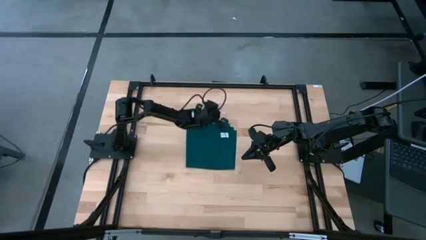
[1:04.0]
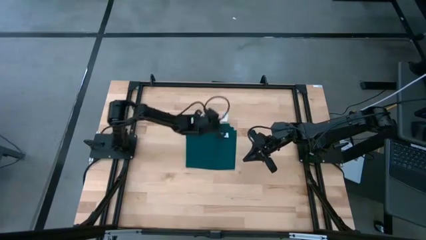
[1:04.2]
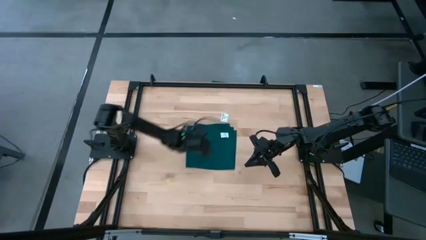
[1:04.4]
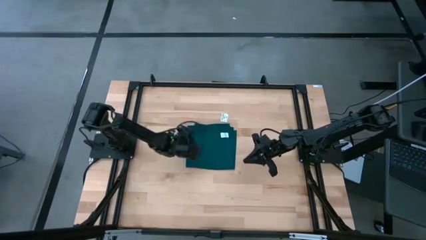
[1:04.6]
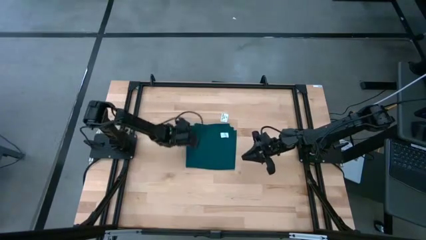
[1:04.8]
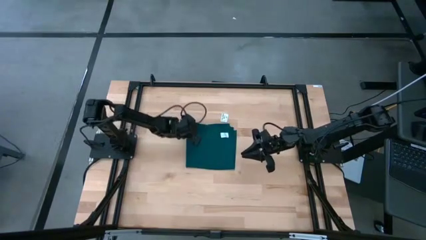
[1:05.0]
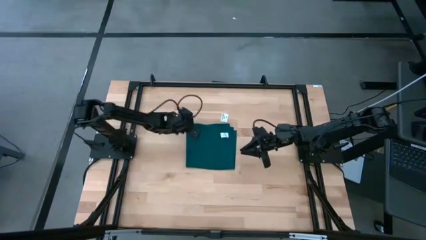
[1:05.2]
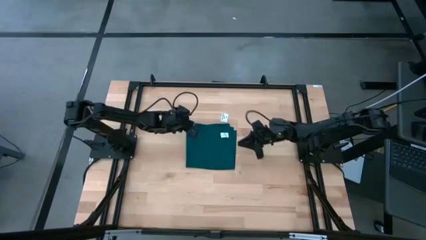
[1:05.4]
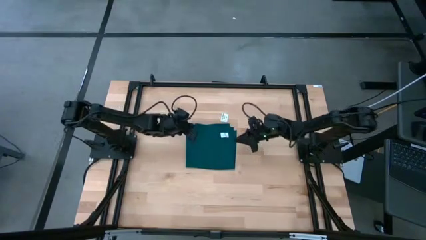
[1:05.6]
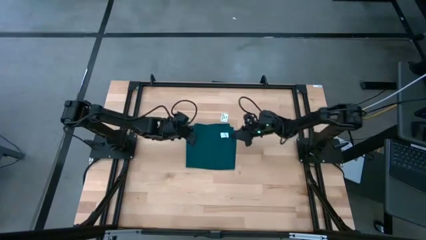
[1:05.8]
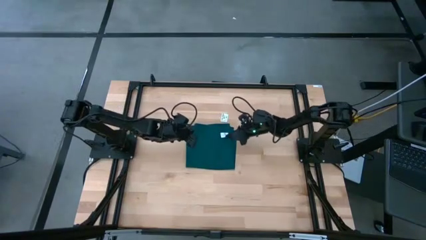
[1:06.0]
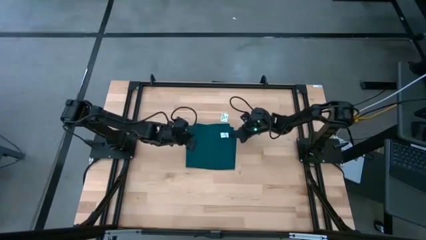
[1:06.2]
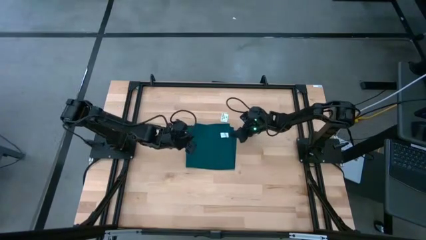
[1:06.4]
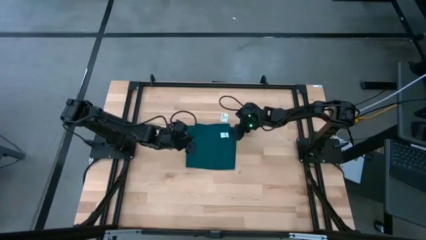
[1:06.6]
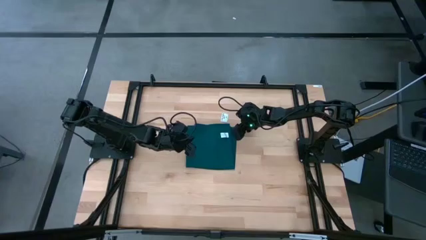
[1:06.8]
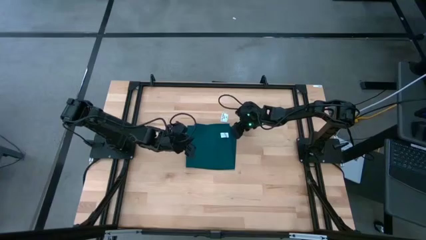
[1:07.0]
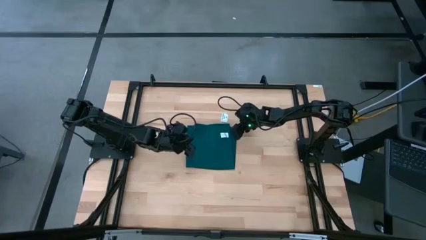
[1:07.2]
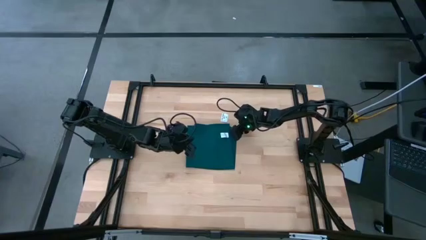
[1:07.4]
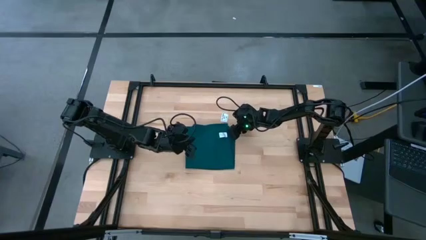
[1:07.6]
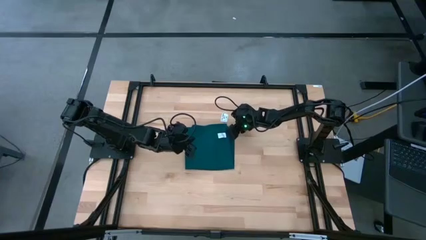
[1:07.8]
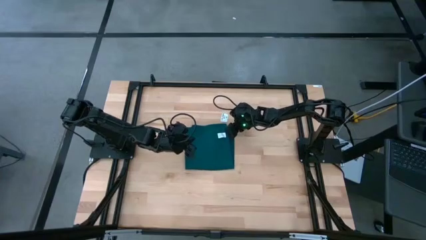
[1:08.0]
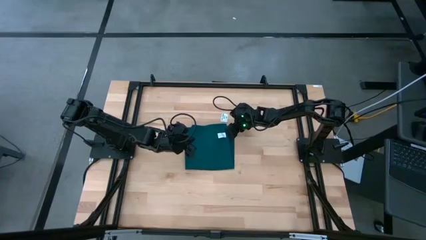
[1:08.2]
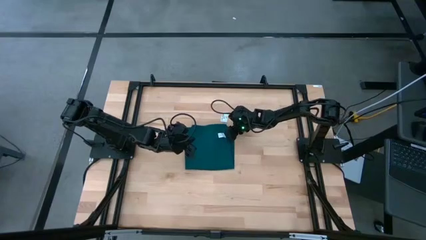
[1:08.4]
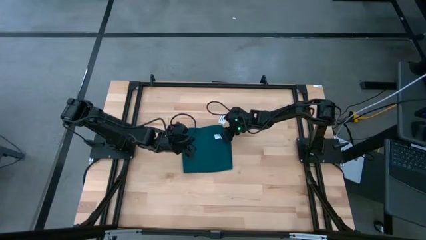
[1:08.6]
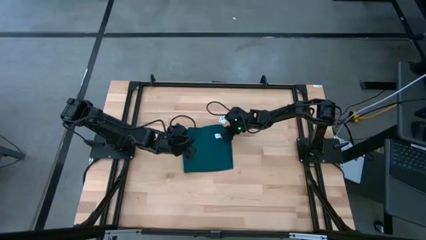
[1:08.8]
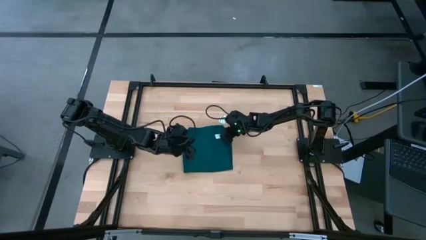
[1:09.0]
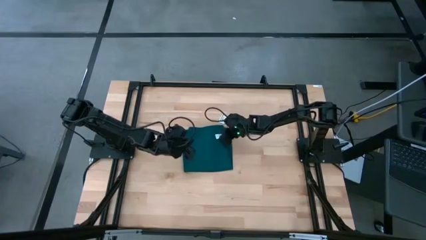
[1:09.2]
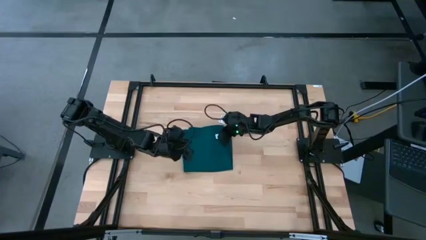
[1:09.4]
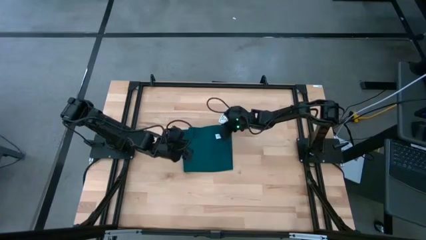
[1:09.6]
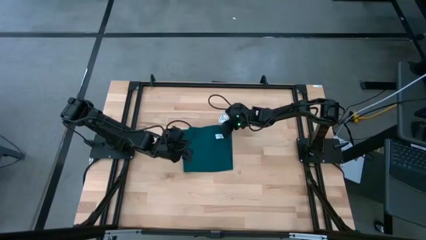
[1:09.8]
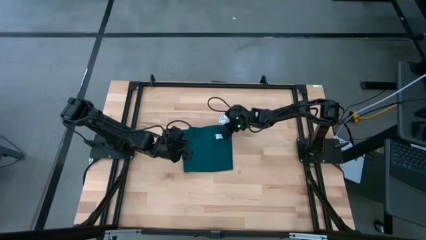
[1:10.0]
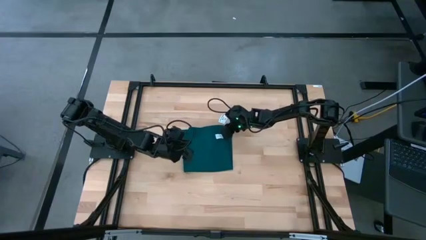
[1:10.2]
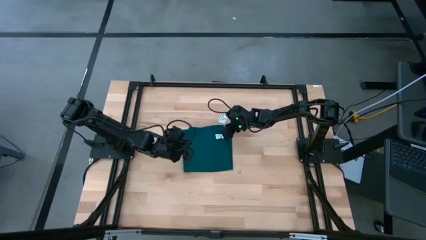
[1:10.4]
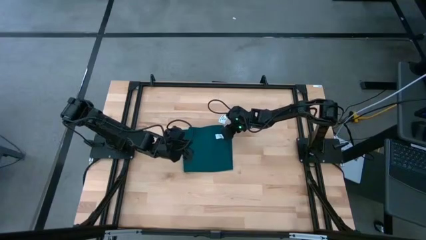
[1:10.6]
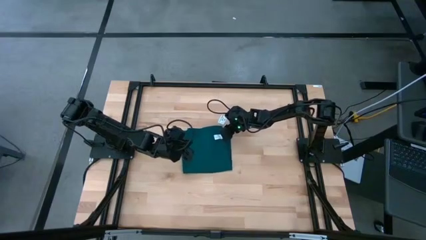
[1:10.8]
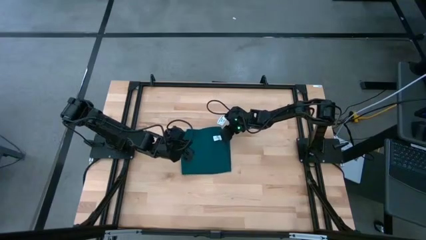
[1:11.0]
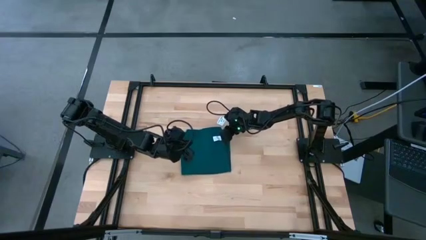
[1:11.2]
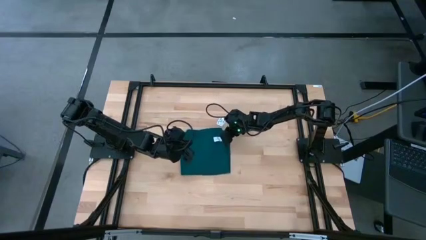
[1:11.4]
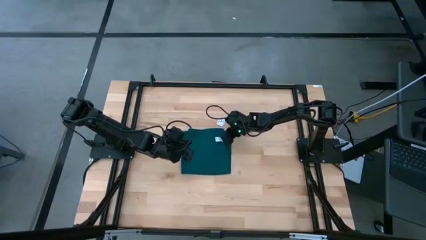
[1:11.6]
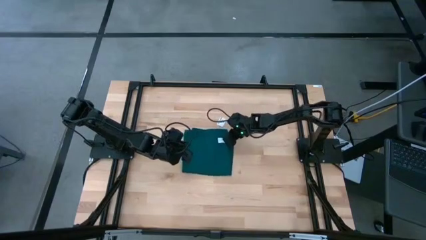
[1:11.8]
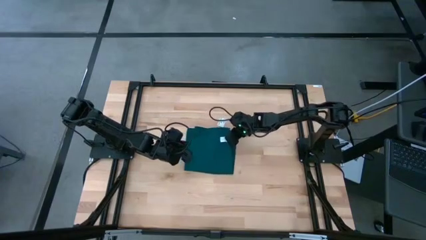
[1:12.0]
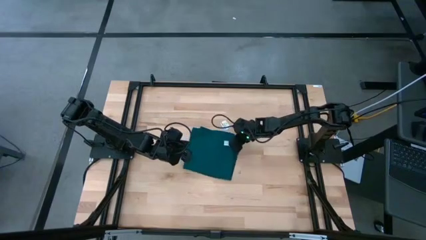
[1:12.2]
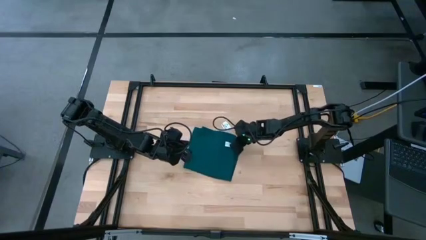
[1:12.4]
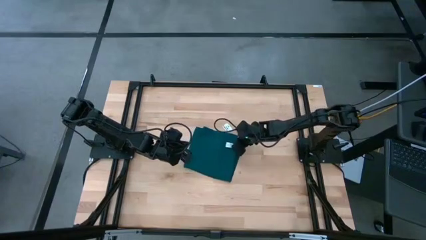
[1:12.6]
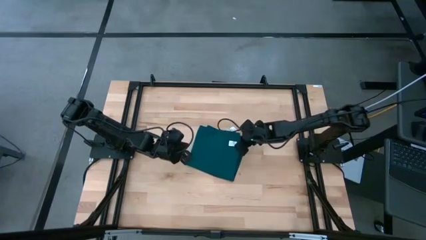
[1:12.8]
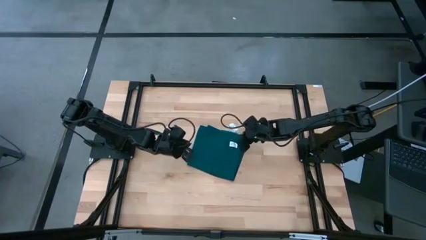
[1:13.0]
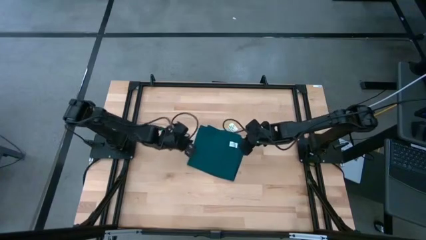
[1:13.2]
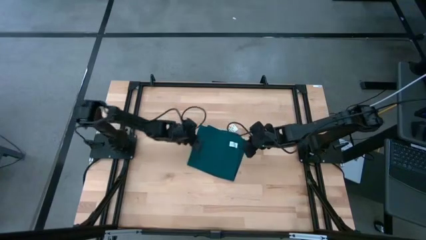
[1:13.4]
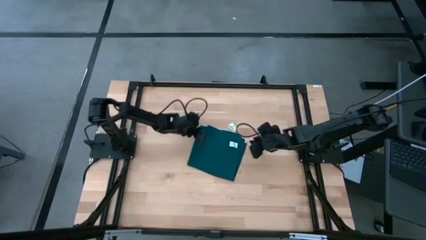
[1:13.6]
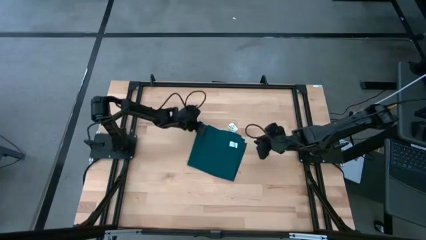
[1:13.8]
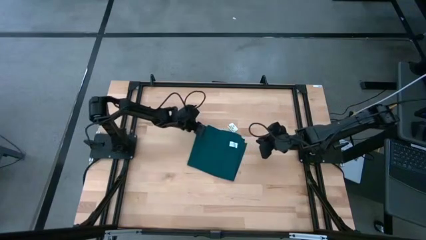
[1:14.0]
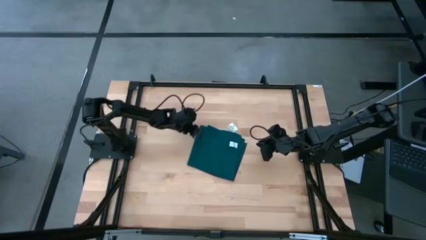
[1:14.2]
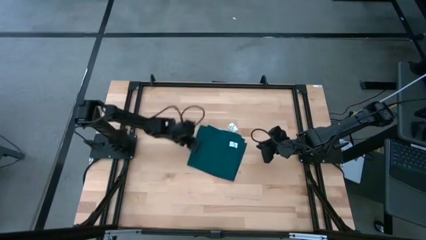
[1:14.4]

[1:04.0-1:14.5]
Task: Fold microfiber towels
Fold the green napkin

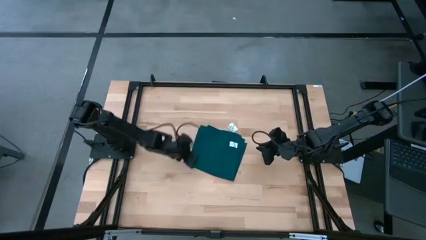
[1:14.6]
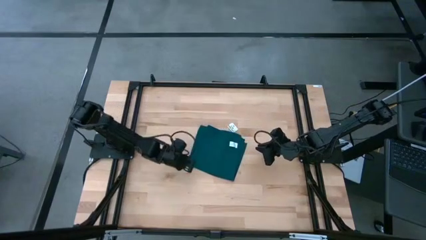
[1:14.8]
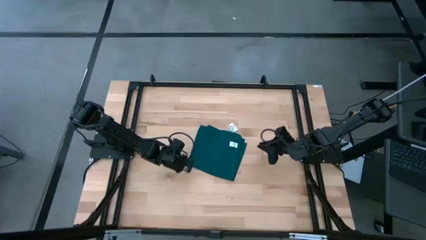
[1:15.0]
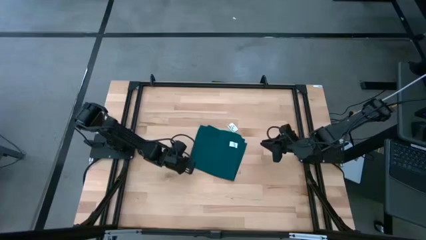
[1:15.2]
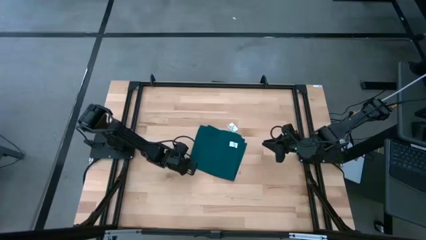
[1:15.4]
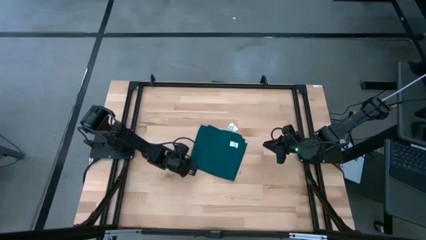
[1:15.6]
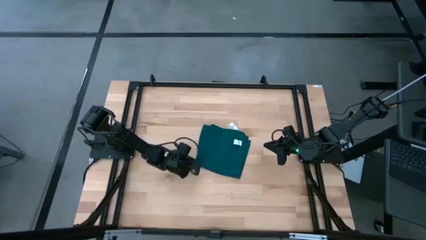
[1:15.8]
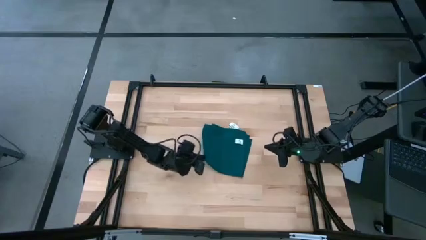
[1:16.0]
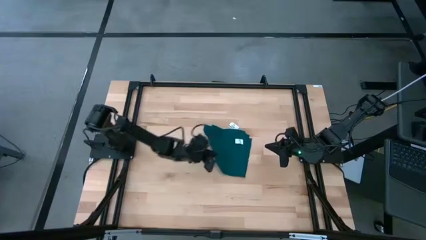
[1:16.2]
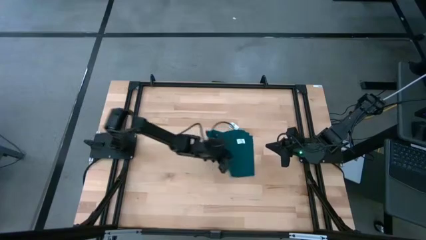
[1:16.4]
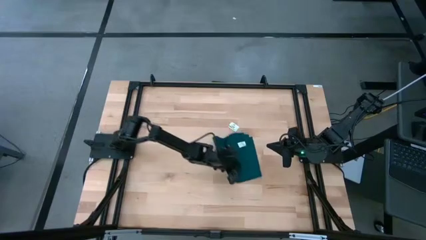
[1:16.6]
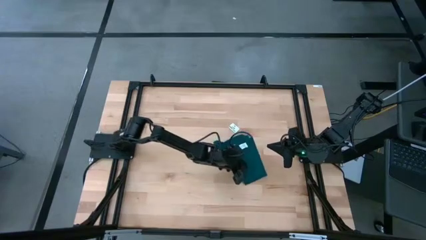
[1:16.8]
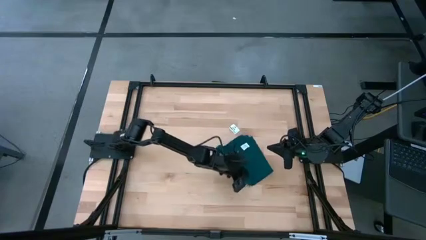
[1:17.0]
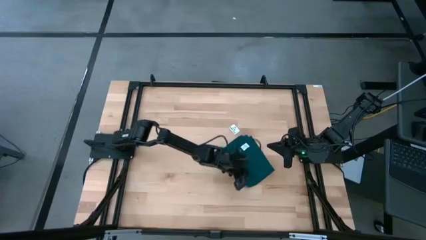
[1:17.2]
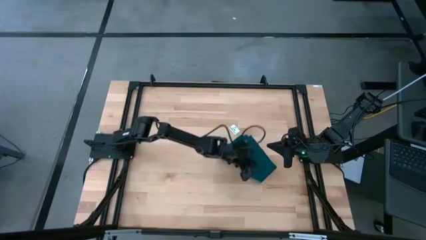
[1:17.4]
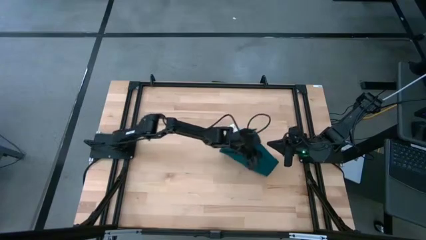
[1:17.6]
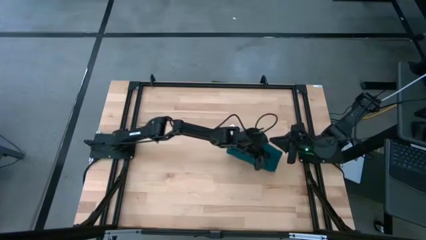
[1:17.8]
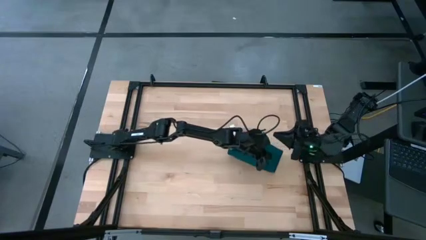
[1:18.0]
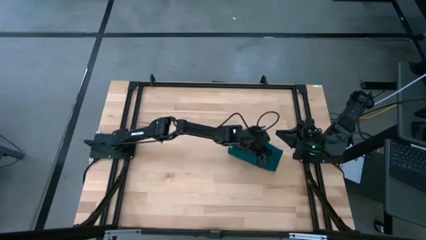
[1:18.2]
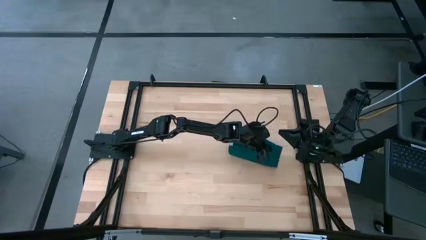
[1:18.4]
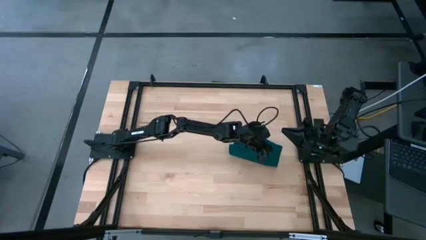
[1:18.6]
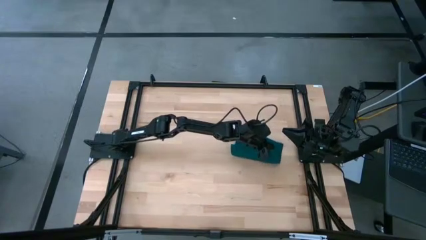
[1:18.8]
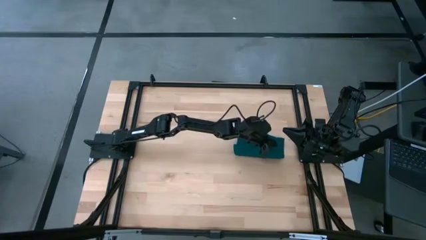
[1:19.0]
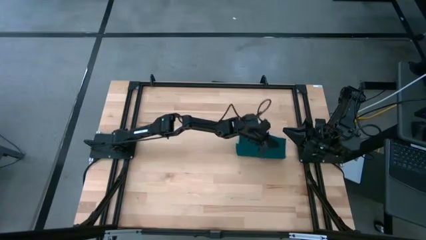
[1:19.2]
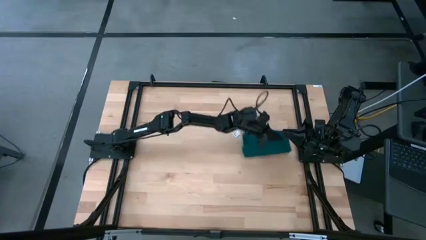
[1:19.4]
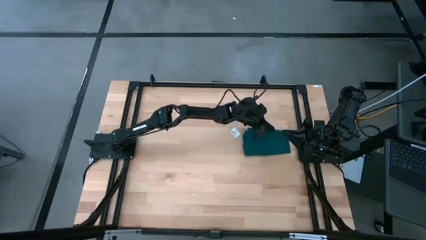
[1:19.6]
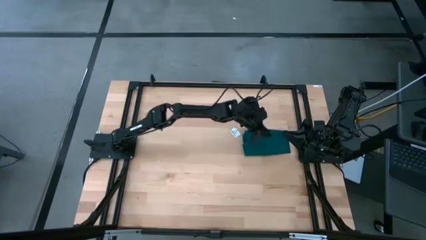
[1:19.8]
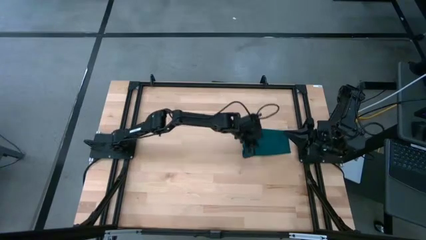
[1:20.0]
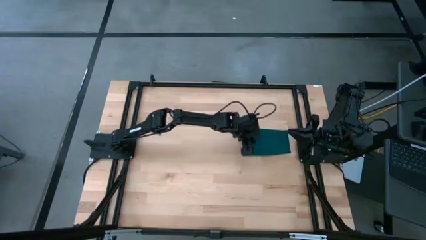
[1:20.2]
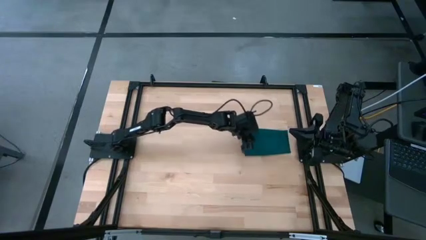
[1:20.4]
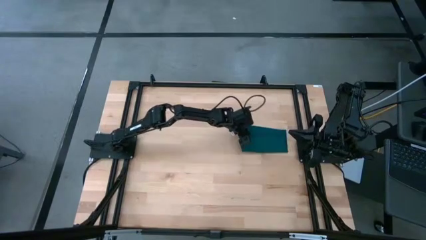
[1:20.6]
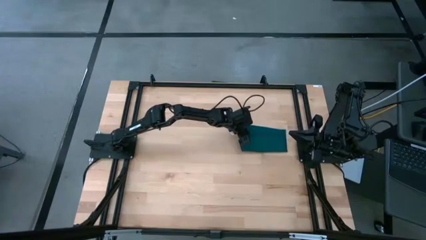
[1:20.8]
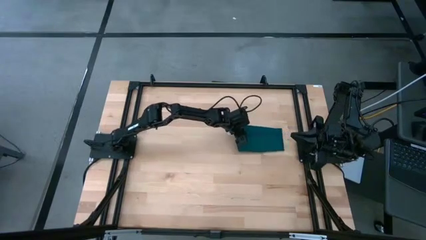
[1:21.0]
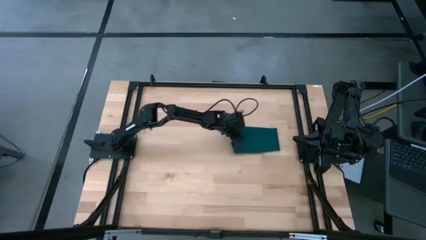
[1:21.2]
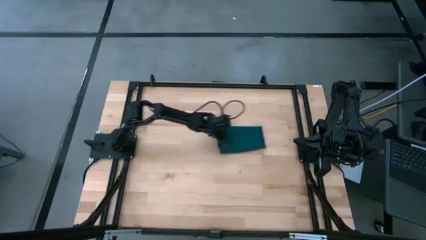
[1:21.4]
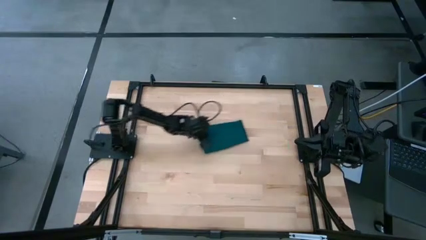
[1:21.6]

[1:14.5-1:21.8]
Fold the green napkin
